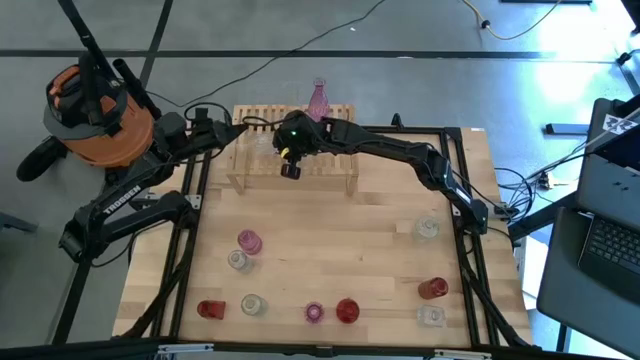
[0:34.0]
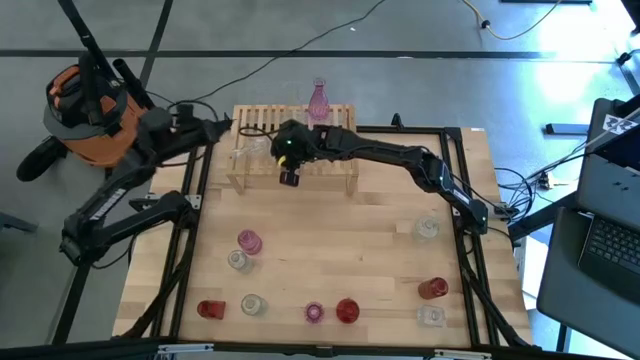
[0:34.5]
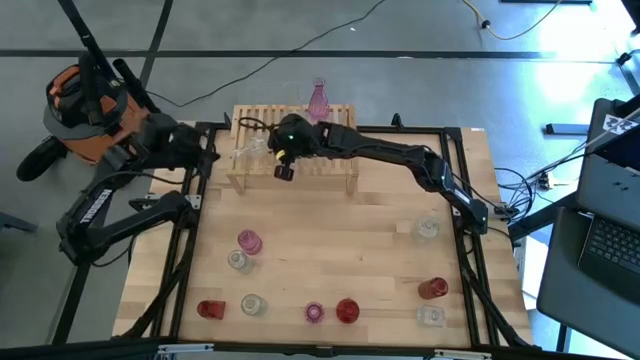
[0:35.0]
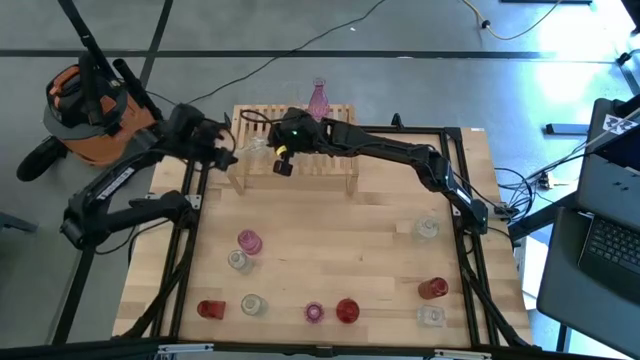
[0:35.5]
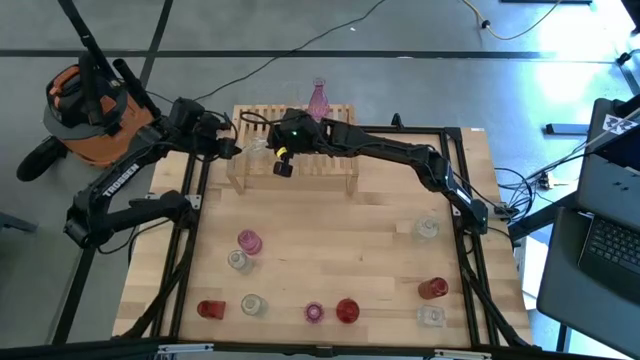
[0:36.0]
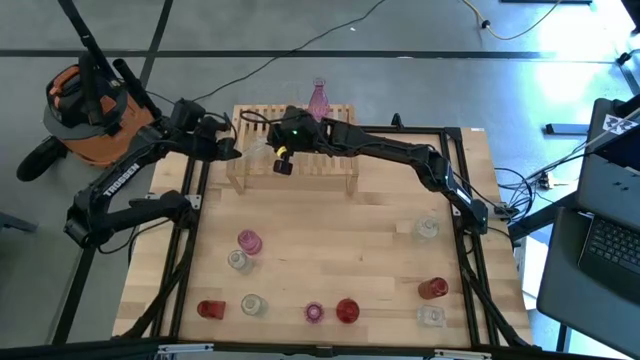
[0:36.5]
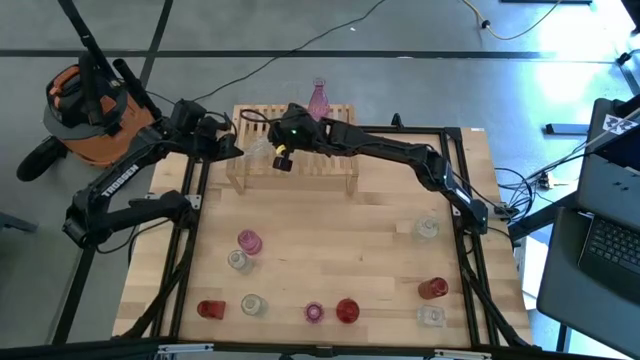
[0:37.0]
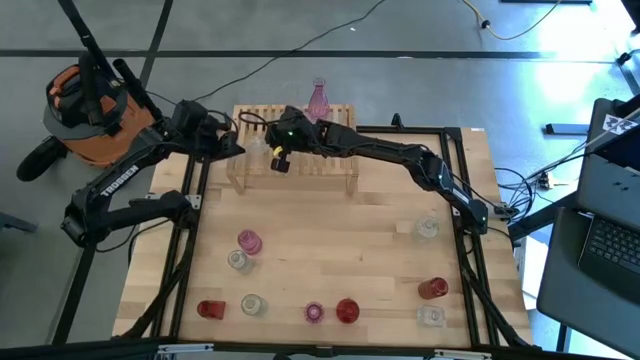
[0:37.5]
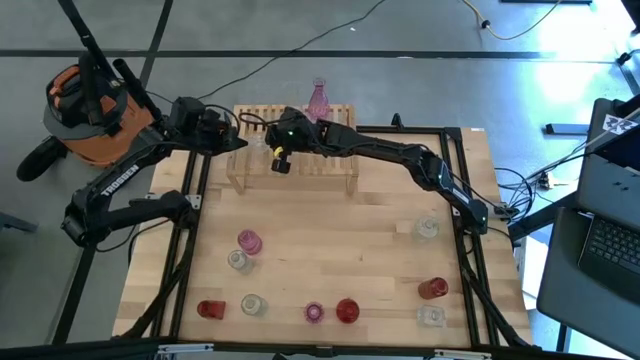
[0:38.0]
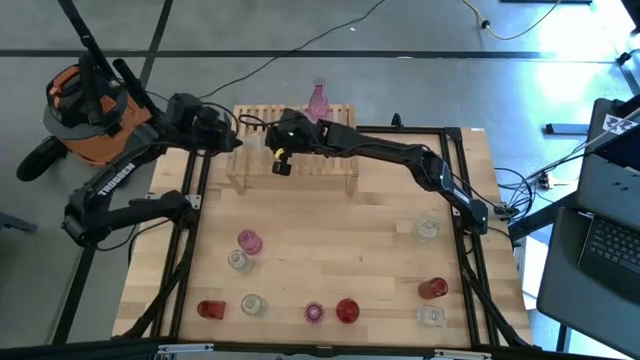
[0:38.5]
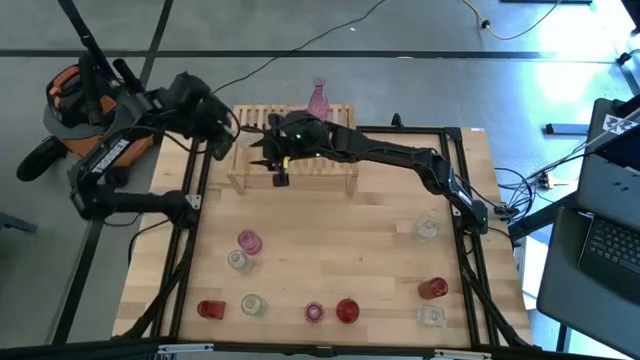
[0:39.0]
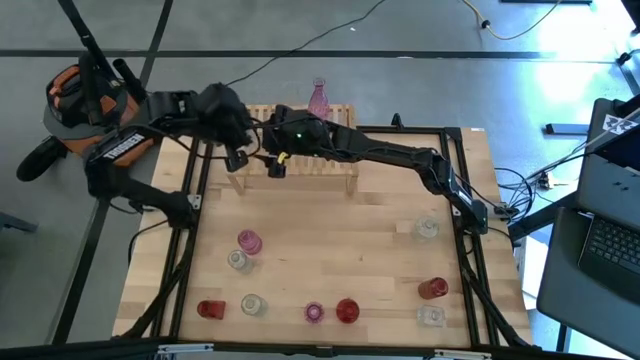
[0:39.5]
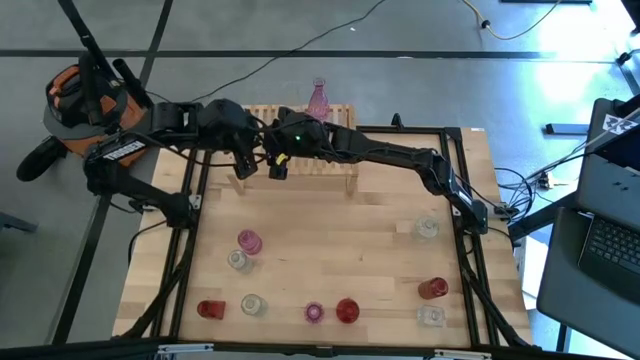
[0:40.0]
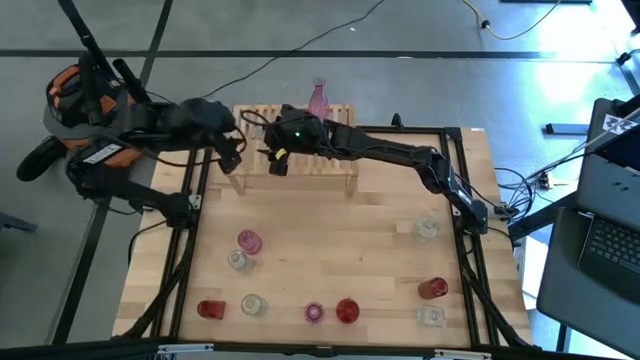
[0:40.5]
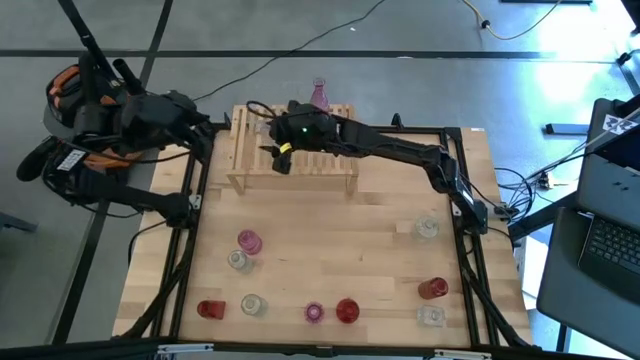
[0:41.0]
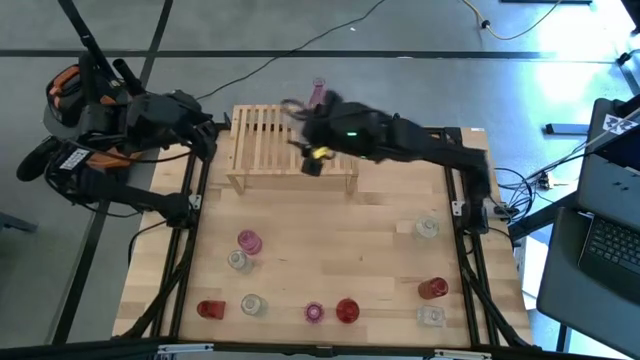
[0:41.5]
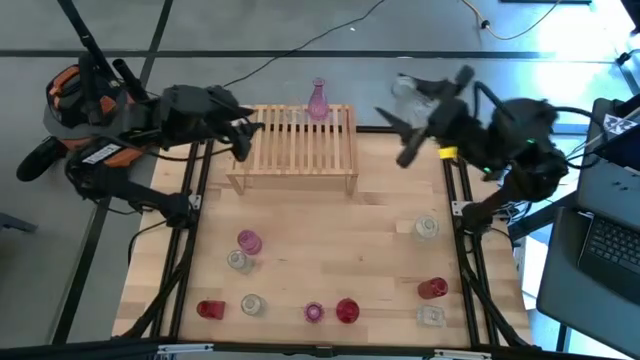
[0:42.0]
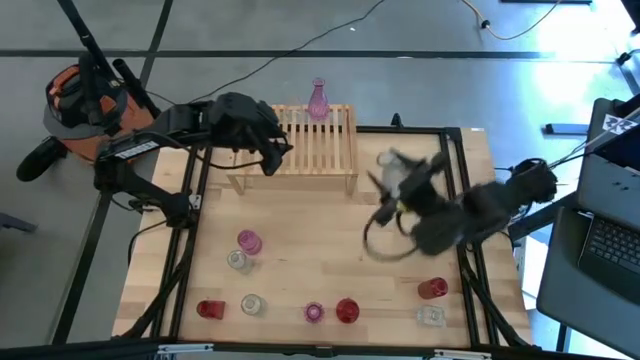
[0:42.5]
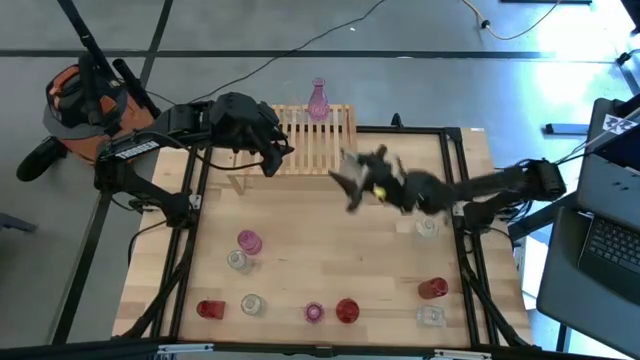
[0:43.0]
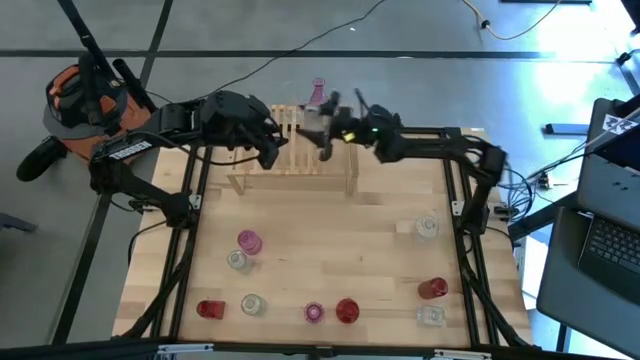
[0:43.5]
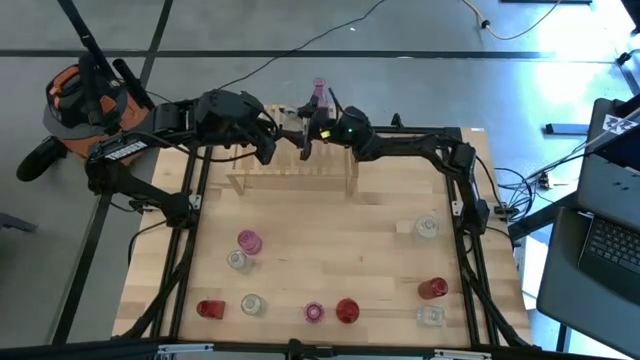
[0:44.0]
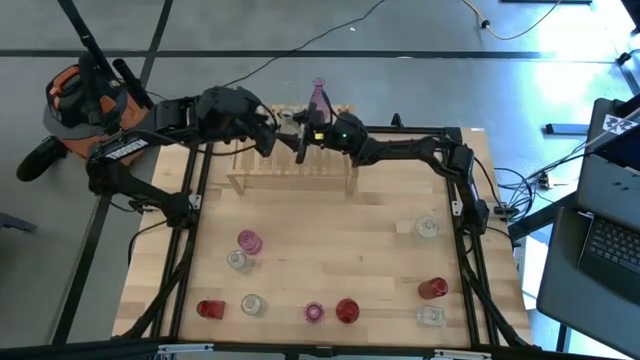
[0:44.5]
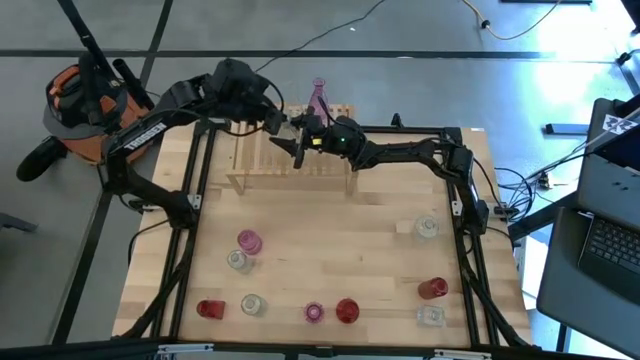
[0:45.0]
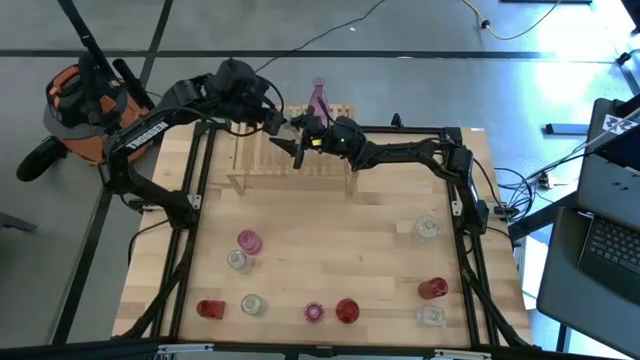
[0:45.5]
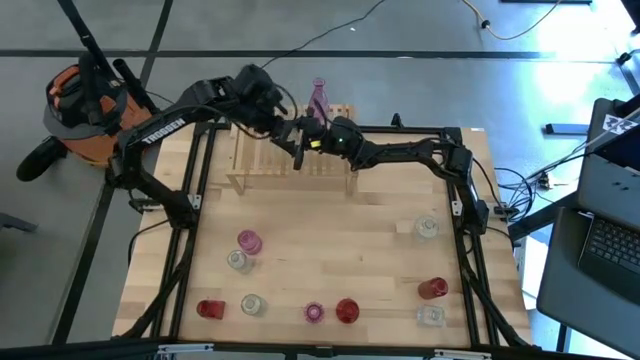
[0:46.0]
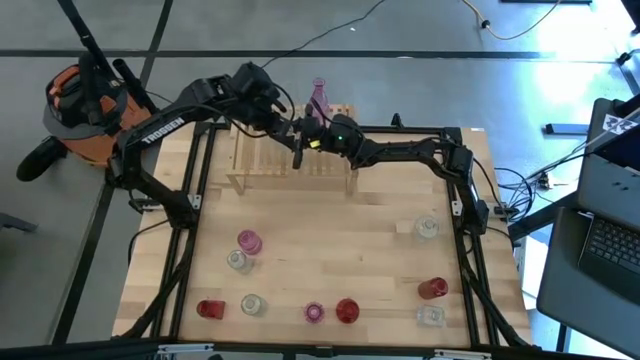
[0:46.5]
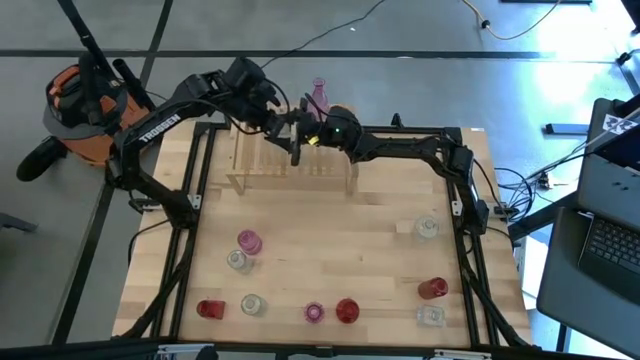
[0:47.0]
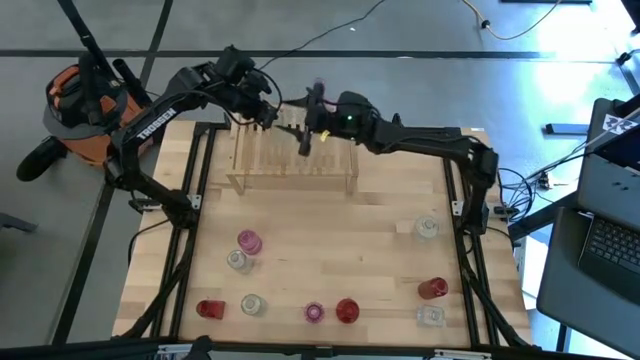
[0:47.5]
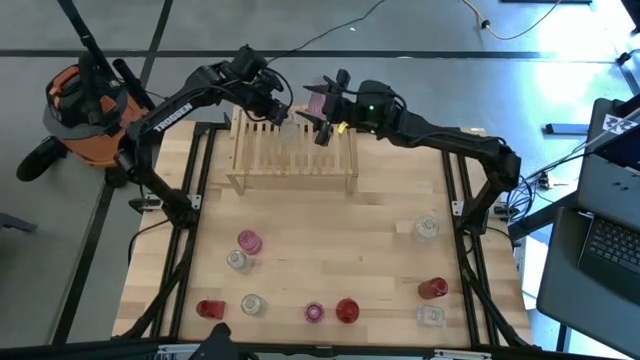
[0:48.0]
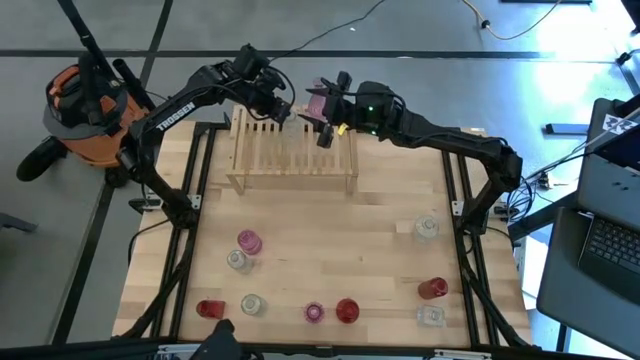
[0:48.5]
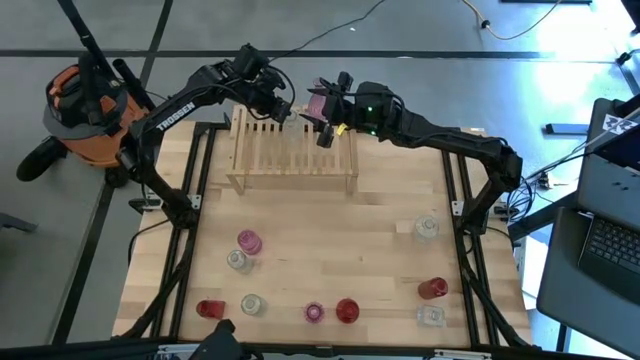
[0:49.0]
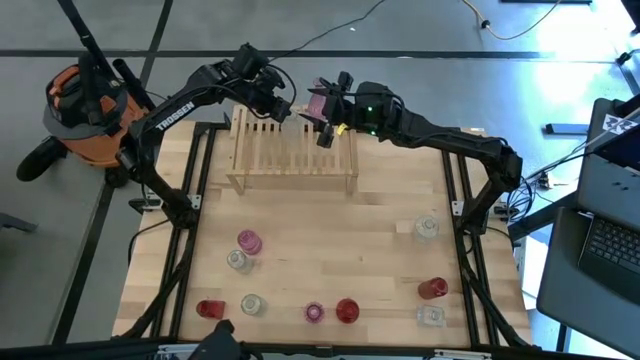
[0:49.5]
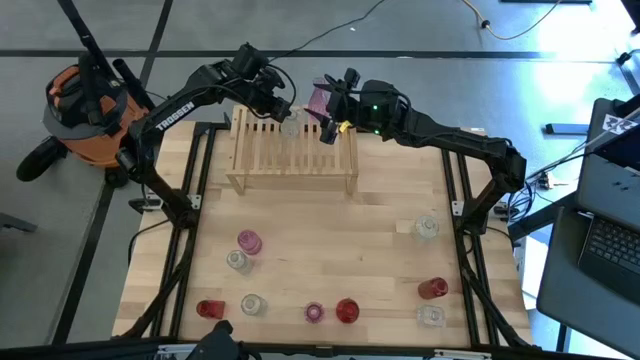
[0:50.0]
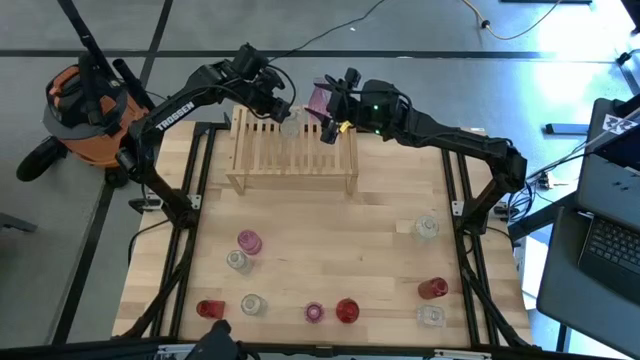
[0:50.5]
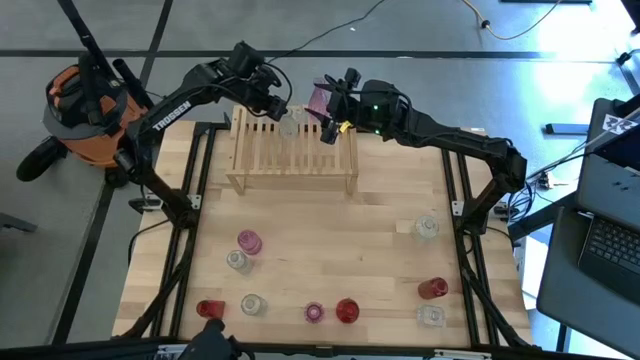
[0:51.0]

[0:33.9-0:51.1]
Task: sort vases onto shelf
Put the transparent vase on the shelf aligned with the other transparent vase on the right

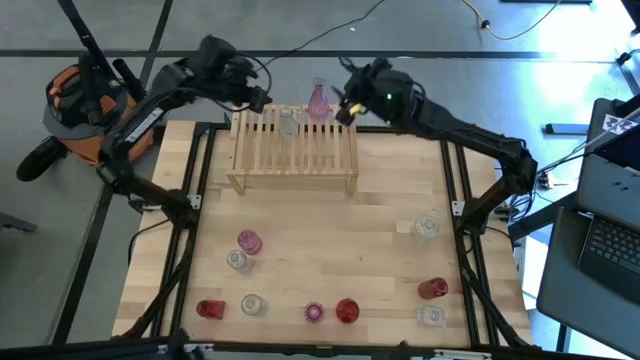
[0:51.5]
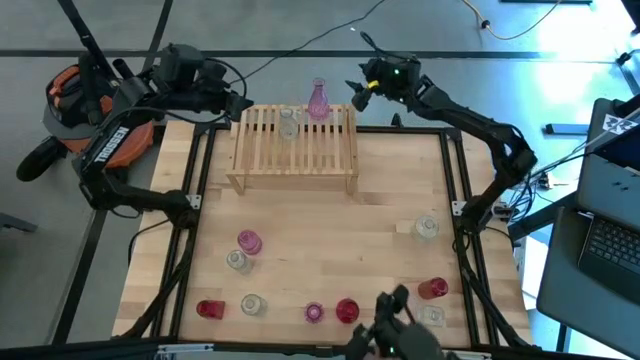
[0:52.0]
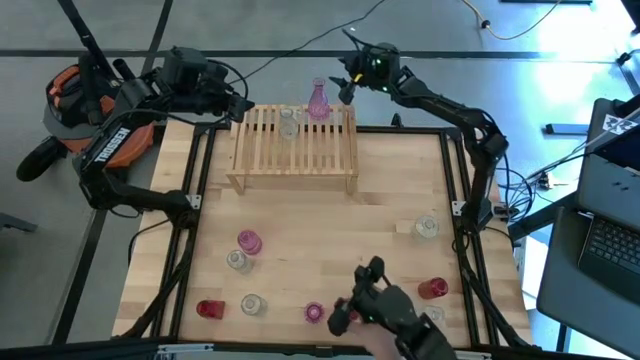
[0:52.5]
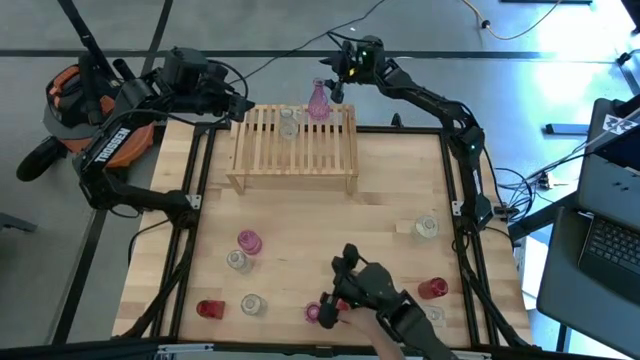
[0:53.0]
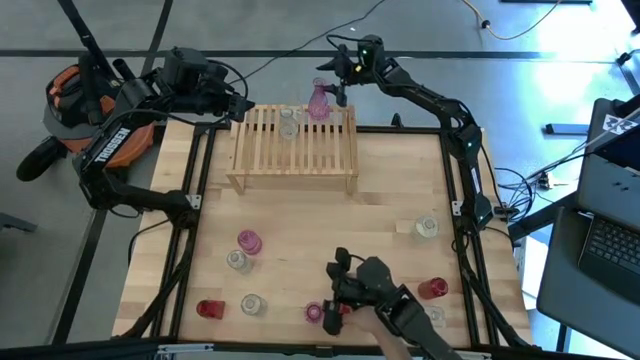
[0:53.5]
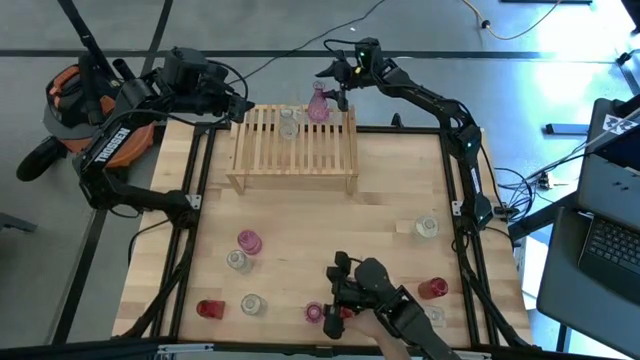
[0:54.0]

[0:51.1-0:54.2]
Adjust the pink vase on the shelf

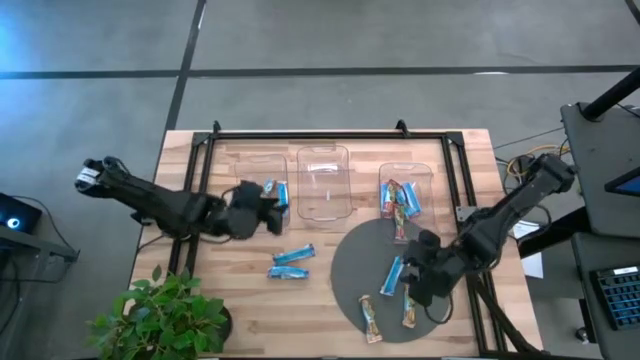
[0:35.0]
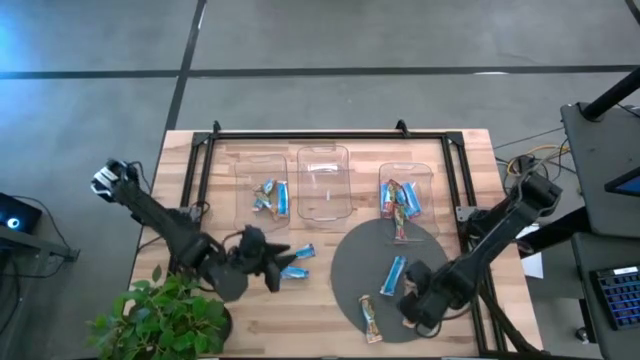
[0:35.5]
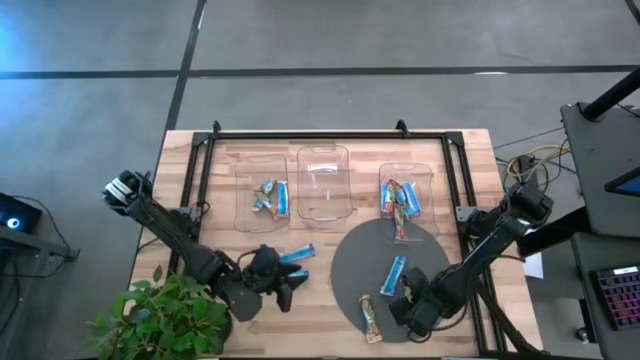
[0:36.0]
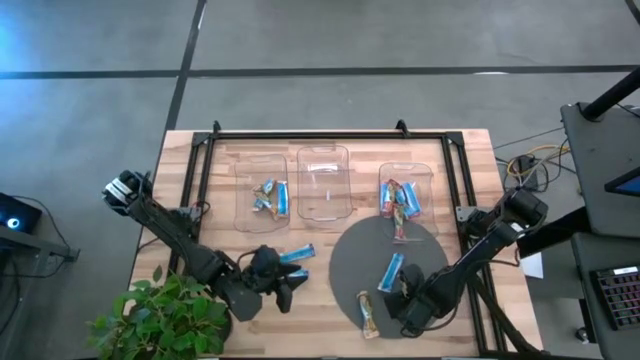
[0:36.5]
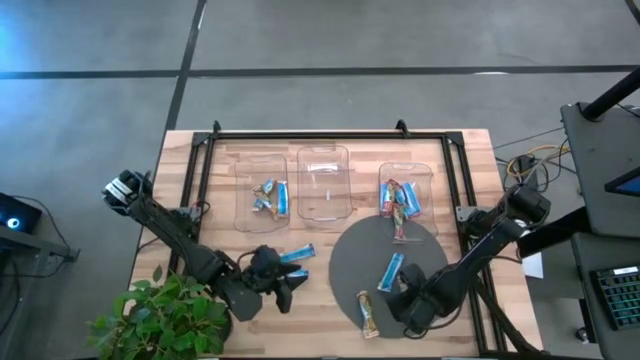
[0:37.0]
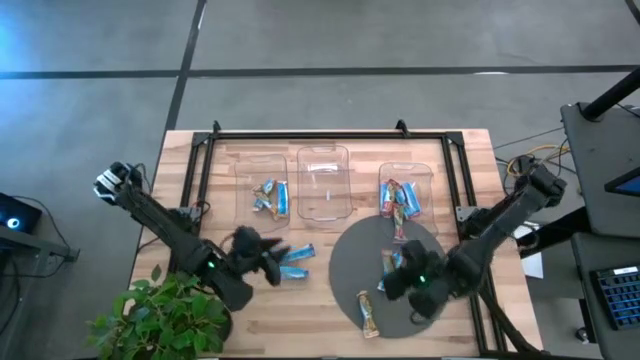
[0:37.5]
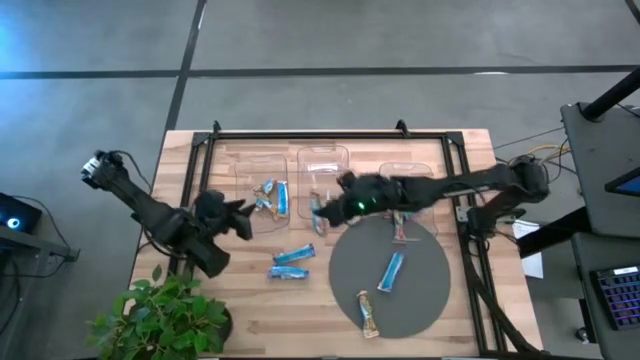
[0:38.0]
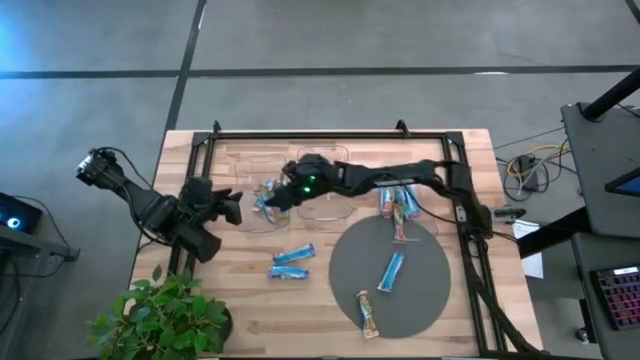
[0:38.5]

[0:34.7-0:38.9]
Task: Pick and place Granola Bars by type
Put the yellow granola bar into the left transparent bin
